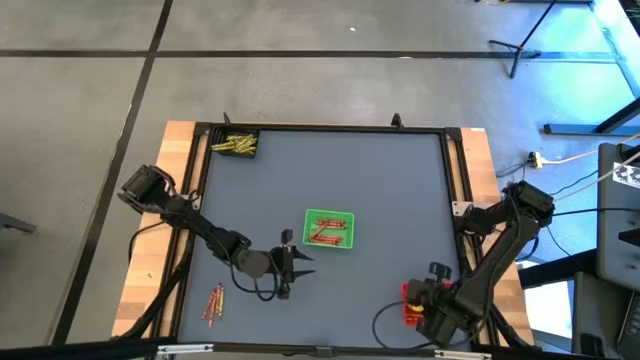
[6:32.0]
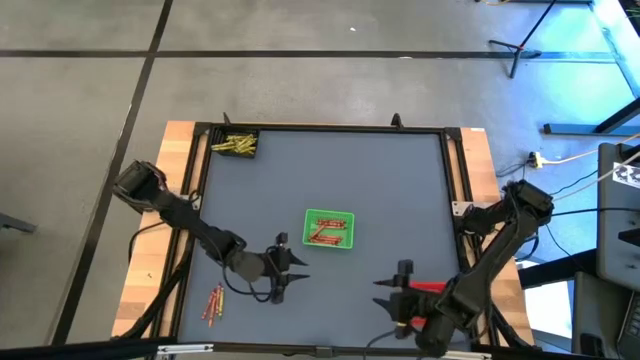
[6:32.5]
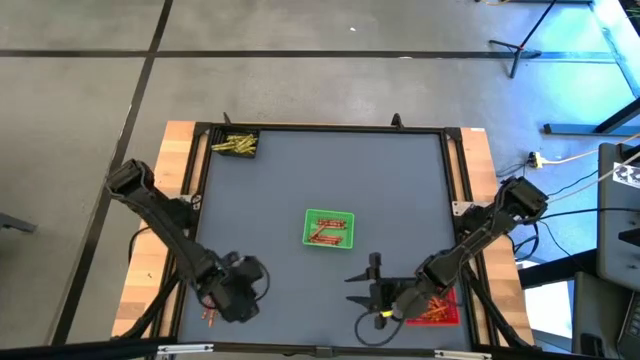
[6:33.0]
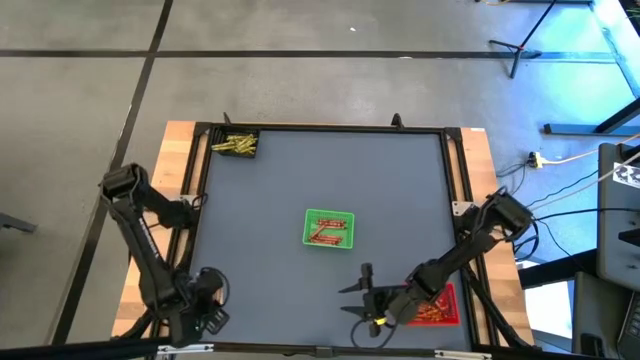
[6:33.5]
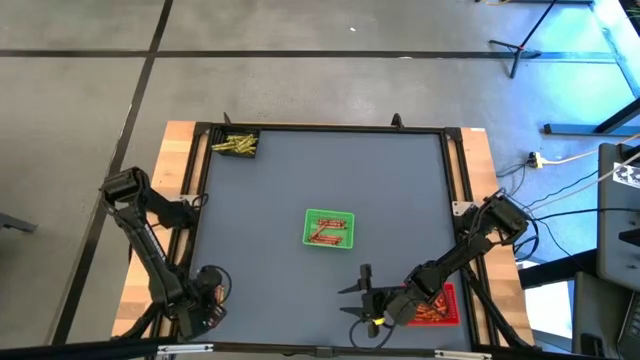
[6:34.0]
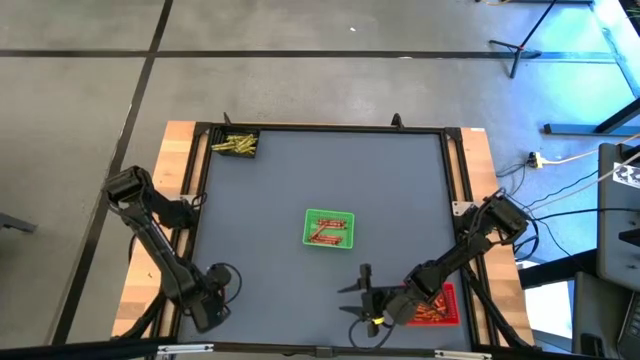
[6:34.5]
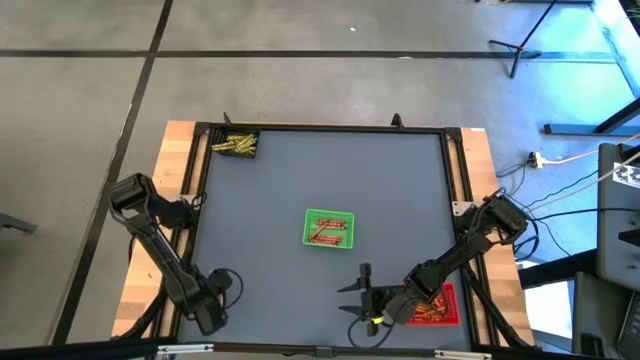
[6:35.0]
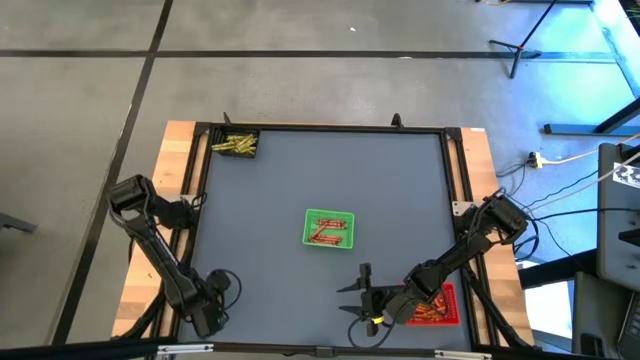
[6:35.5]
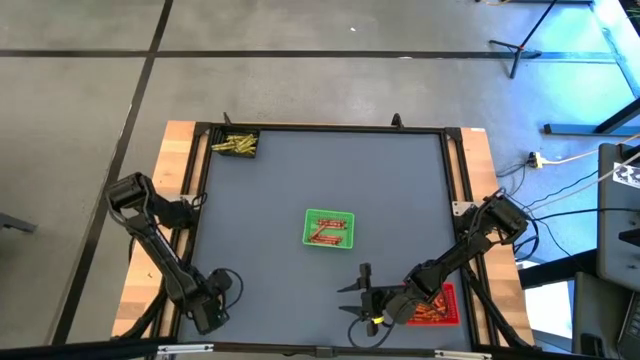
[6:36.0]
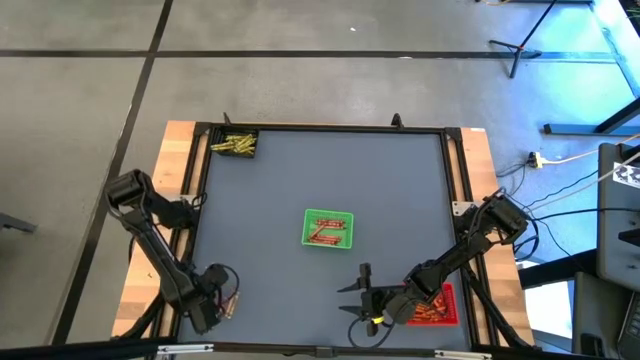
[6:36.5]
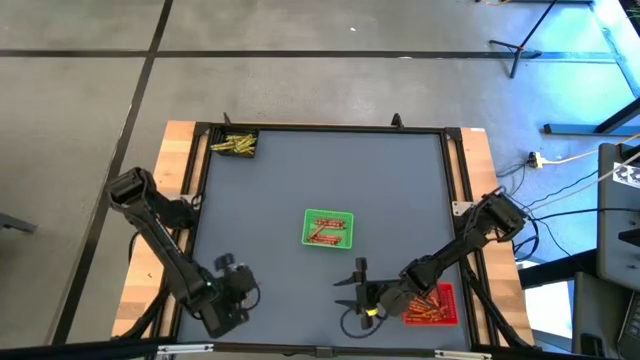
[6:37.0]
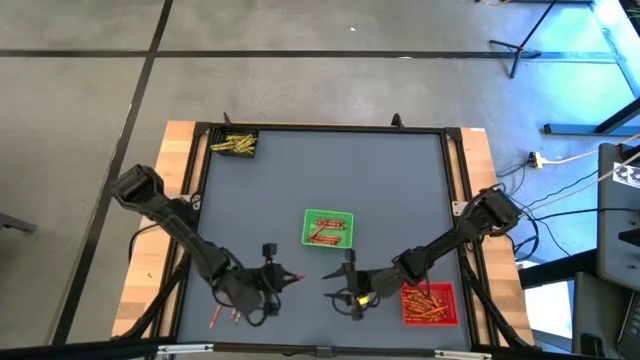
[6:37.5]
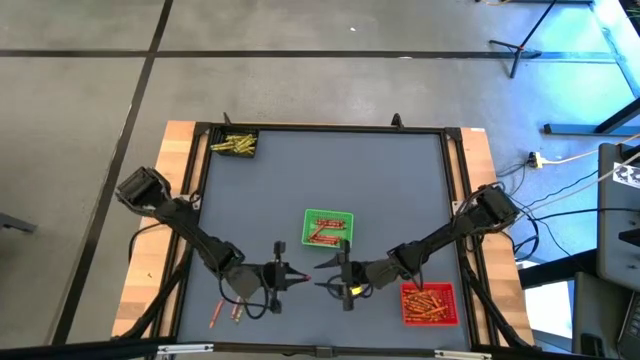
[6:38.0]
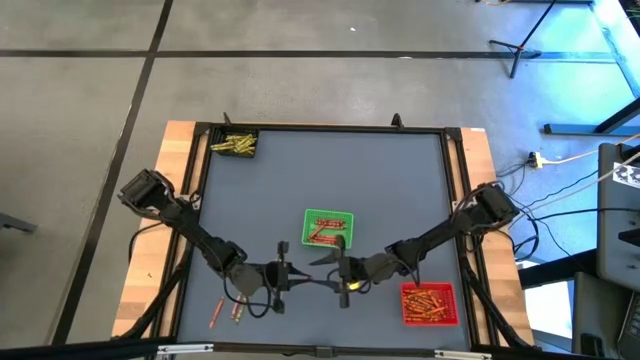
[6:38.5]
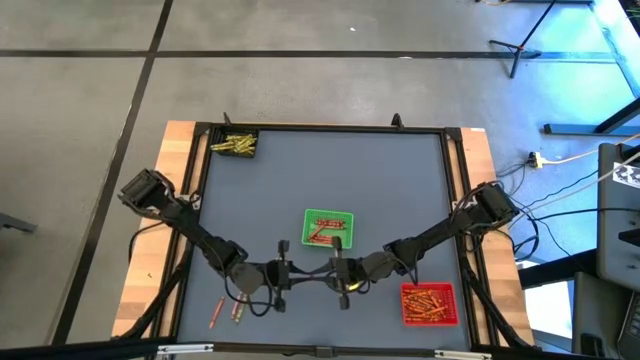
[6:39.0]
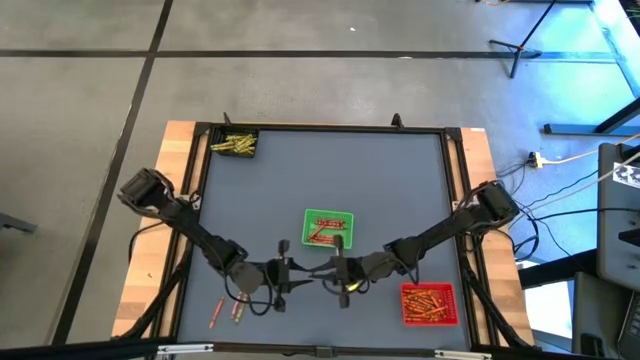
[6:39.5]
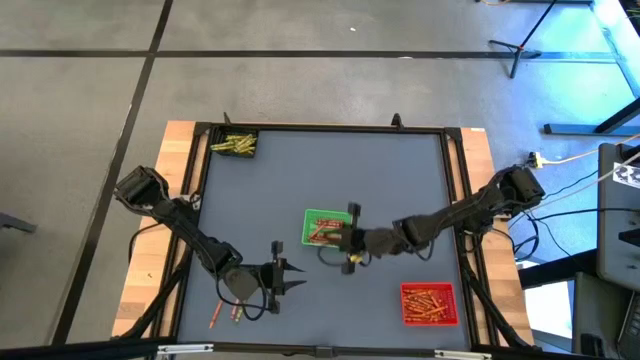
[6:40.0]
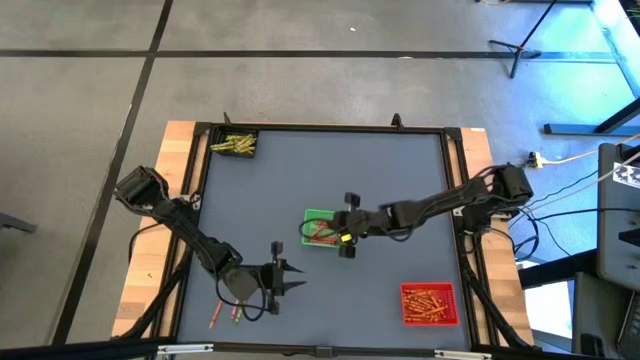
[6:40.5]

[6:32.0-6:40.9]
Task: Sort crayons
Put the red crayon into the green bin

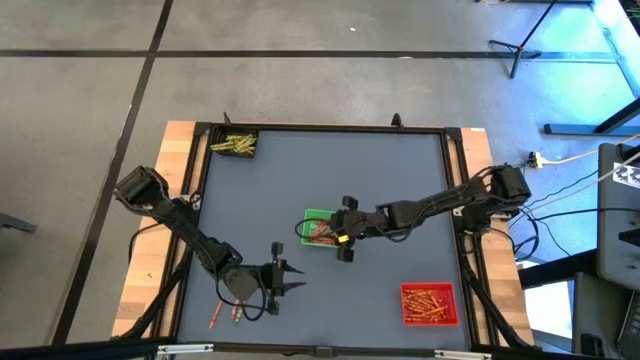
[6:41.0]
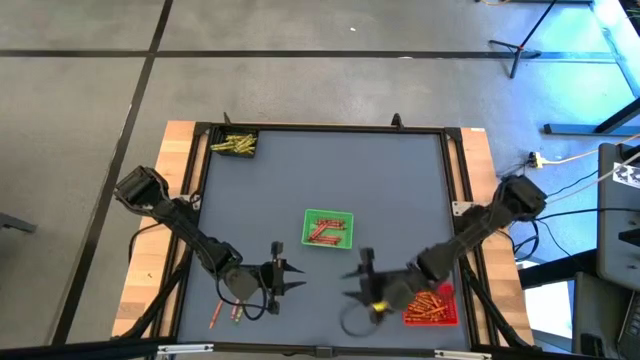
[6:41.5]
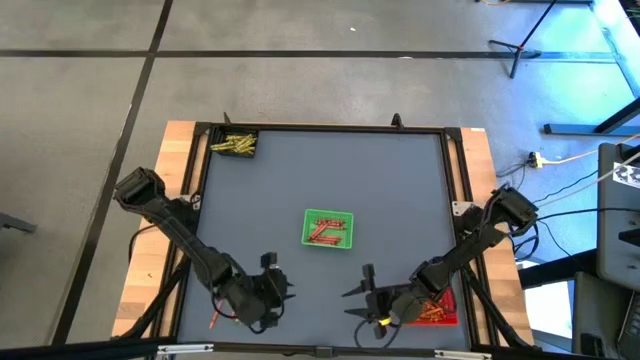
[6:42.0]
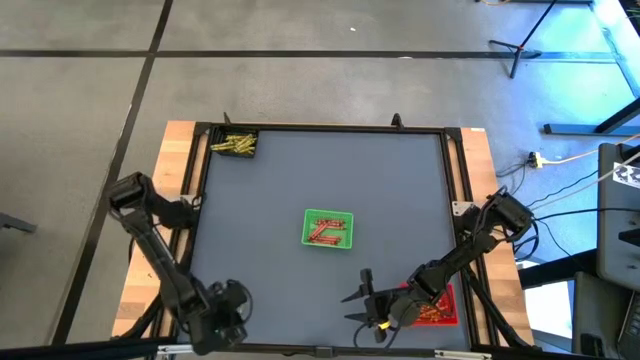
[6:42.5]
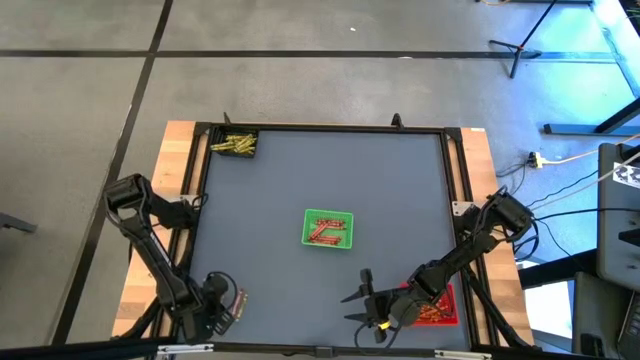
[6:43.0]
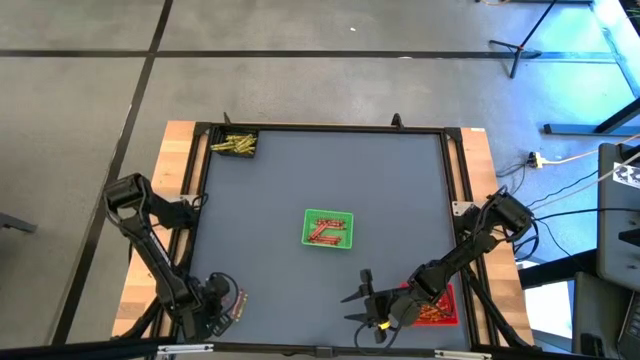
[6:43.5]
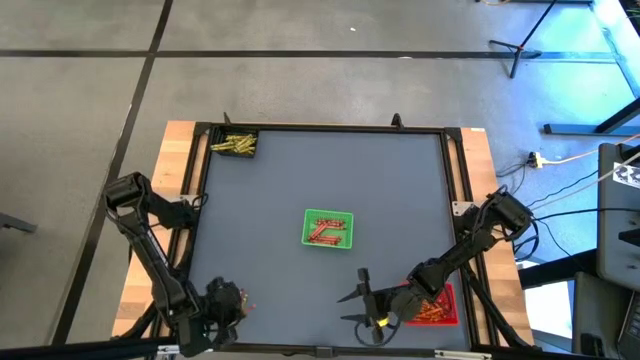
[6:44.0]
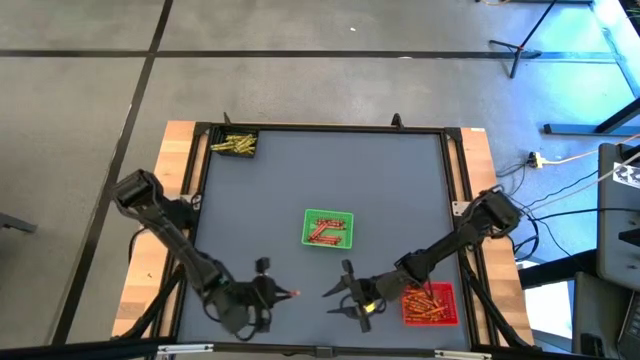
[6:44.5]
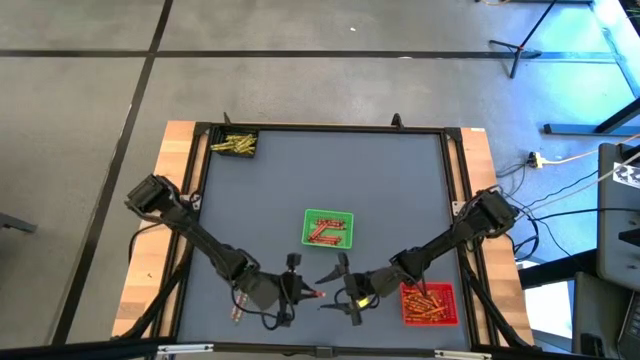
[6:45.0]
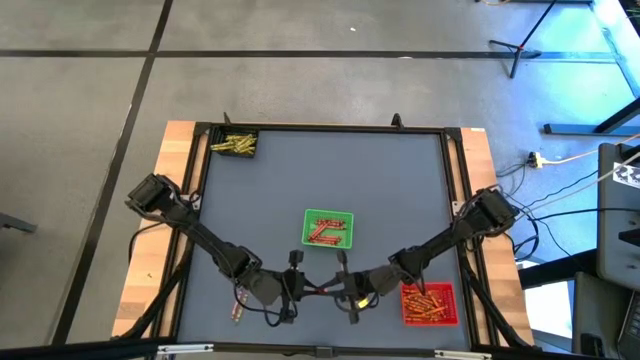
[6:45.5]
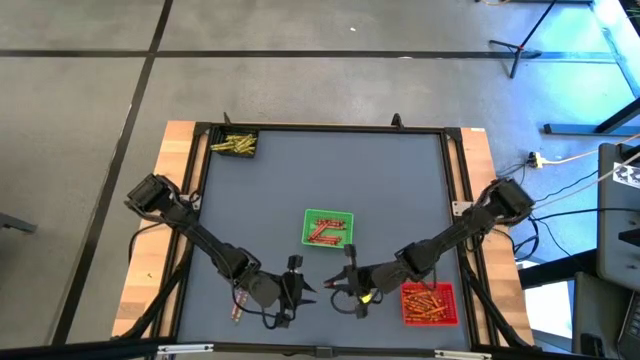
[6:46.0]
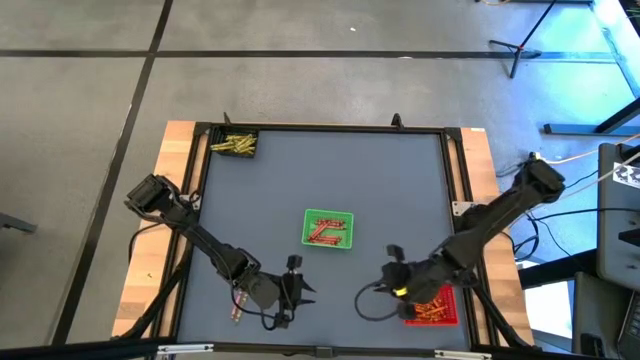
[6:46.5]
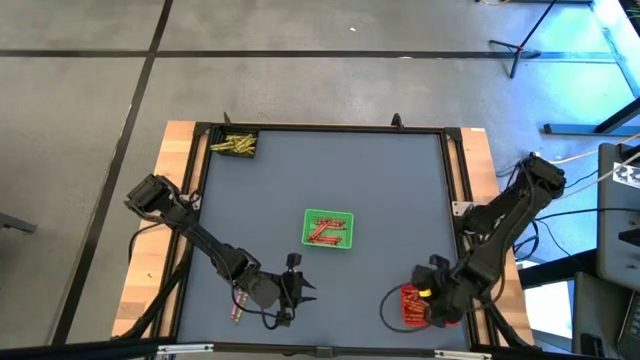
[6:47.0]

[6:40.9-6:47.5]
Put the orange crayon into the red bin

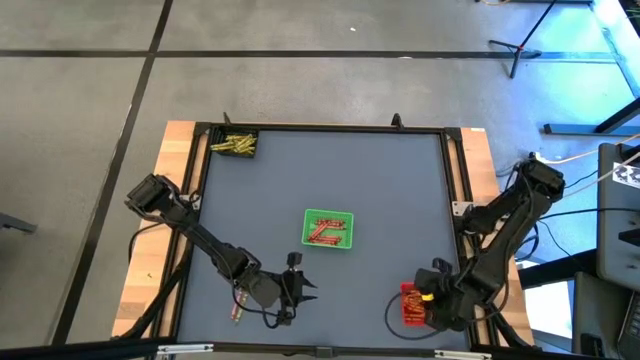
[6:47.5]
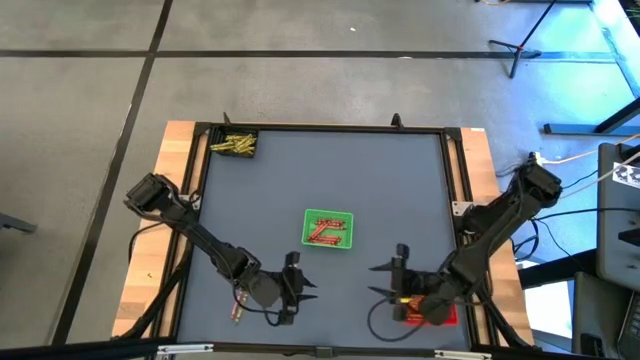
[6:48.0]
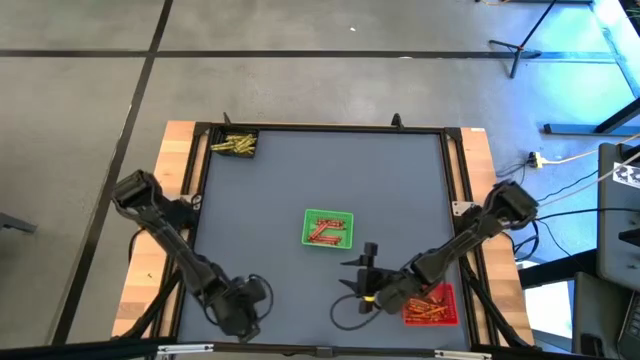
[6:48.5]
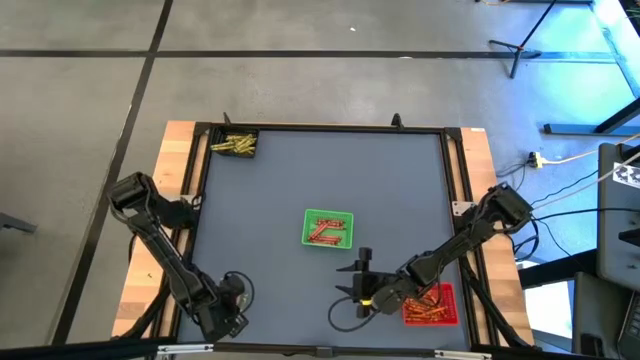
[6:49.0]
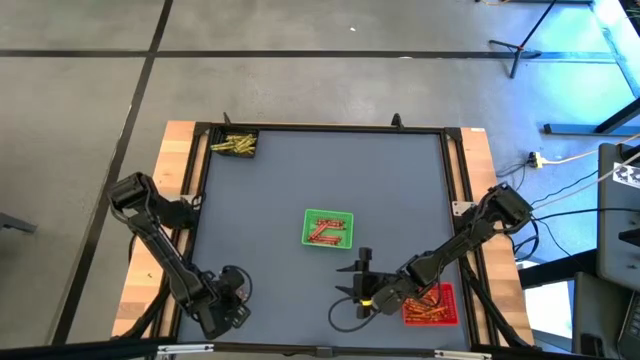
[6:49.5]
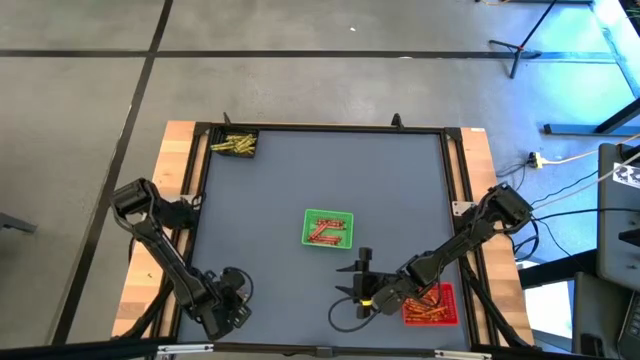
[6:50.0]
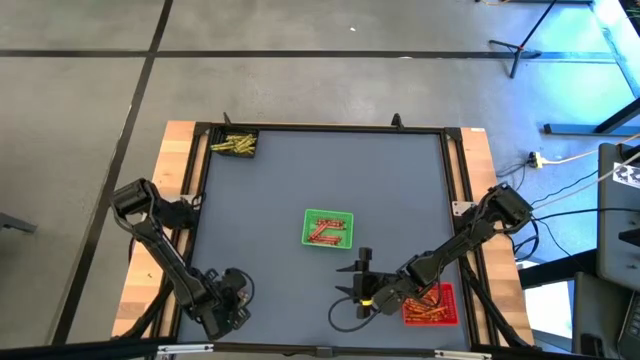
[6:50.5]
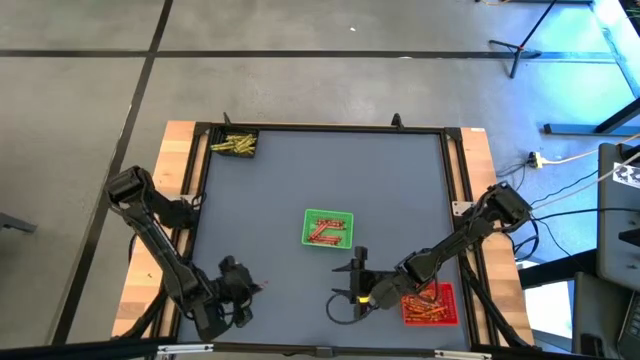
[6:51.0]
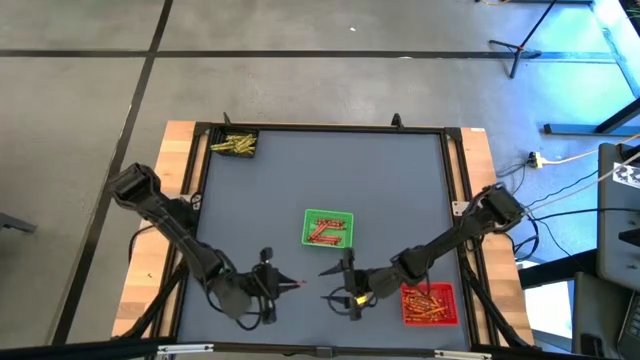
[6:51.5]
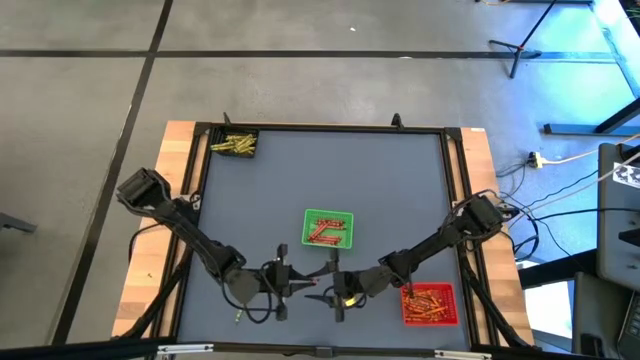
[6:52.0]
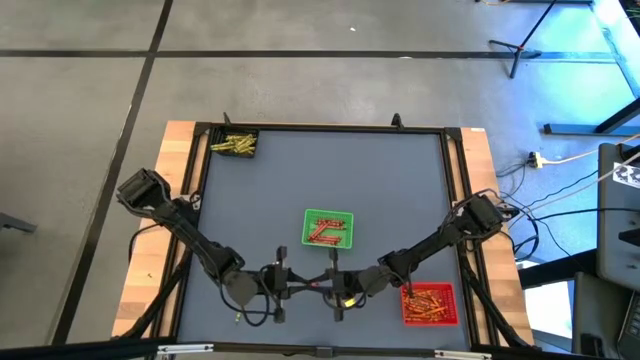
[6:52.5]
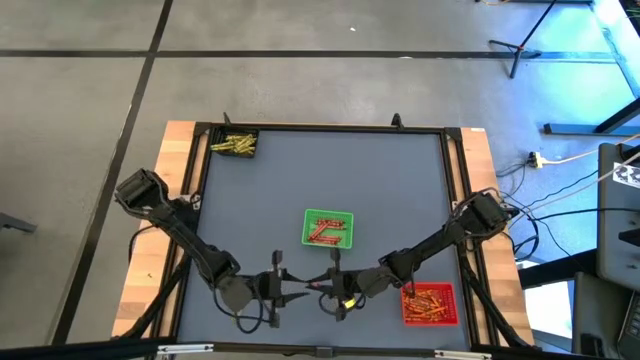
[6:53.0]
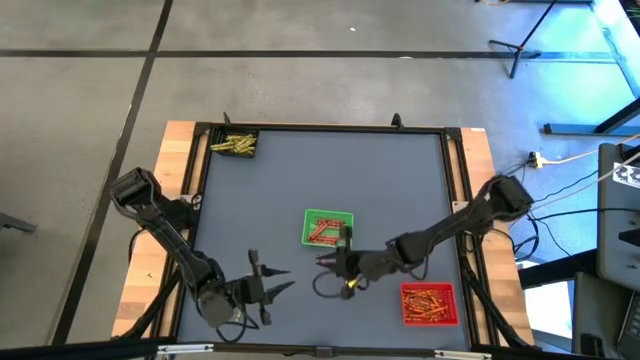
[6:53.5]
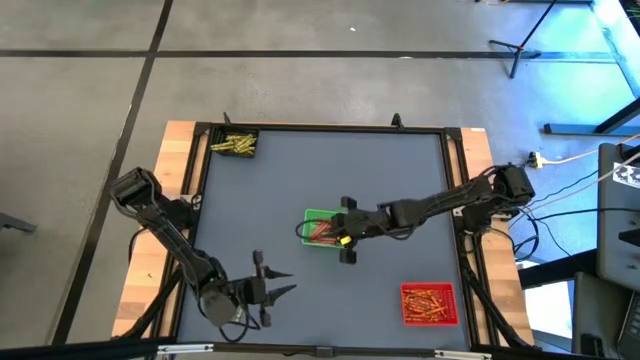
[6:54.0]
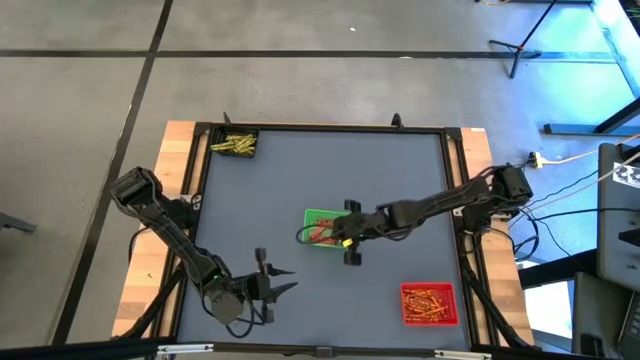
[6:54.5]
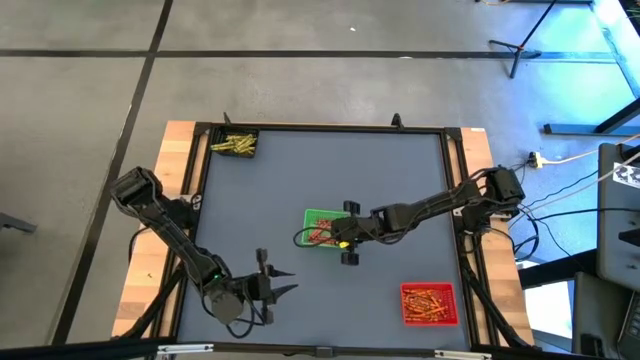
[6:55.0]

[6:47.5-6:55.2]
Put the red crayon into the green bin
